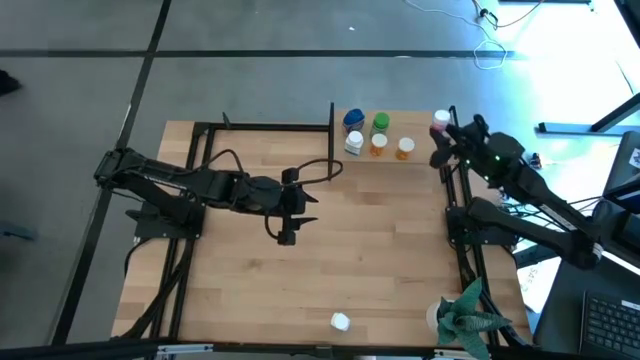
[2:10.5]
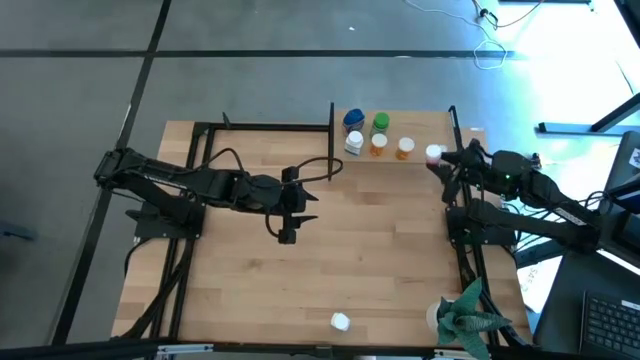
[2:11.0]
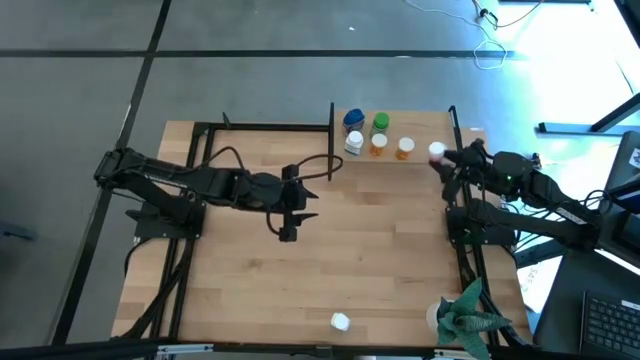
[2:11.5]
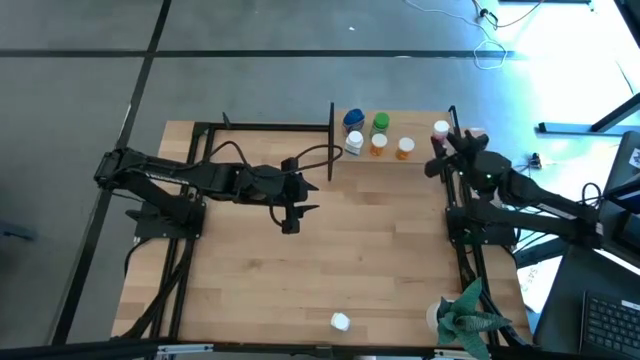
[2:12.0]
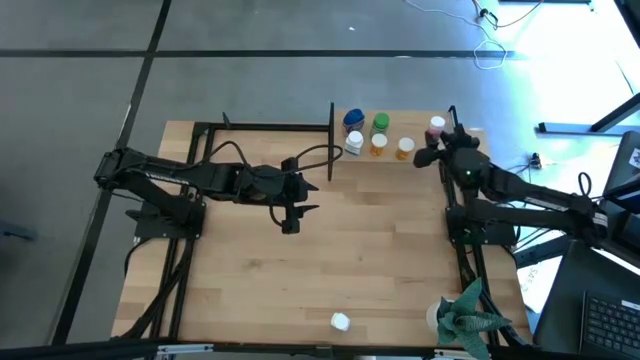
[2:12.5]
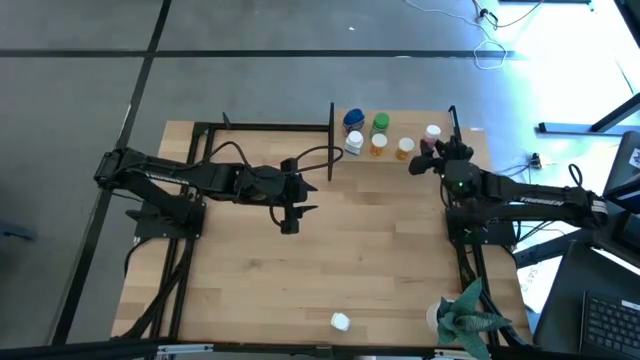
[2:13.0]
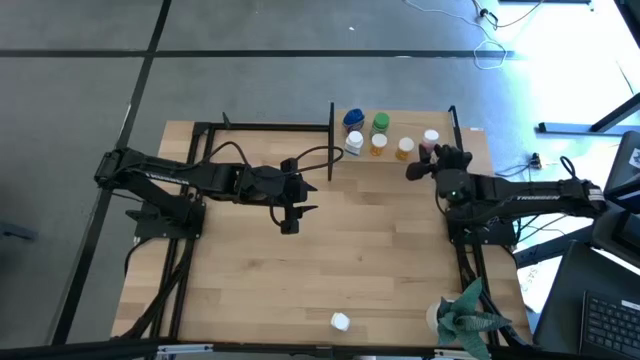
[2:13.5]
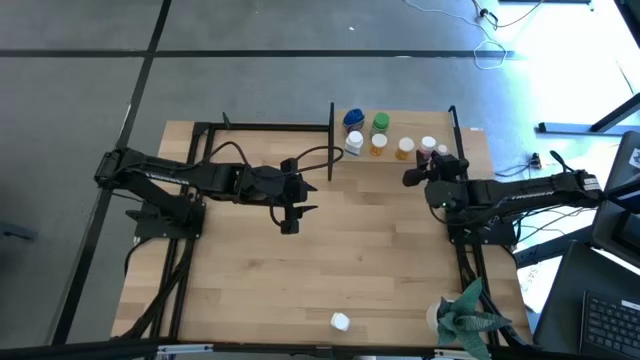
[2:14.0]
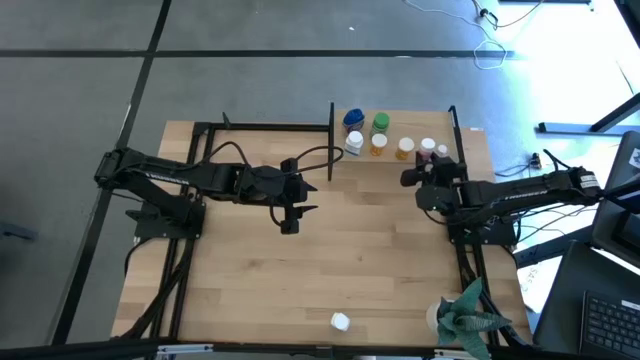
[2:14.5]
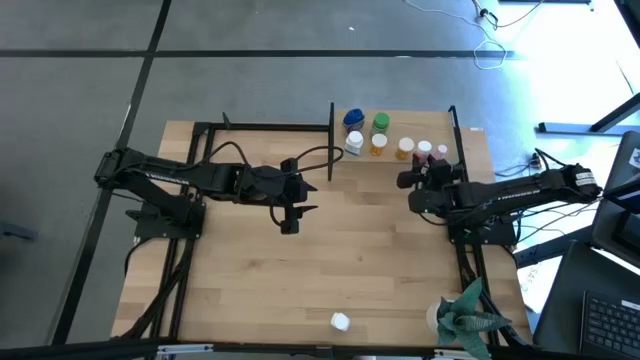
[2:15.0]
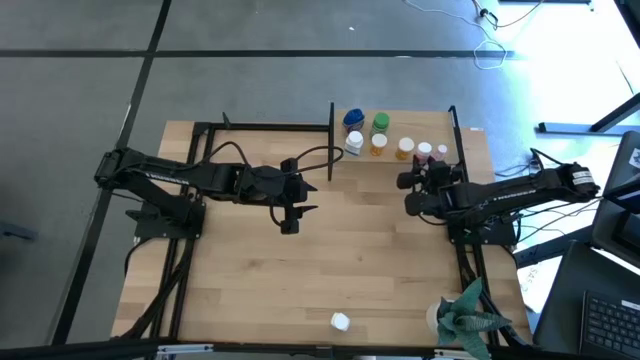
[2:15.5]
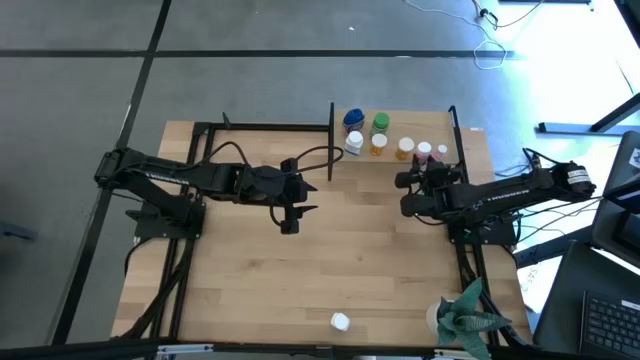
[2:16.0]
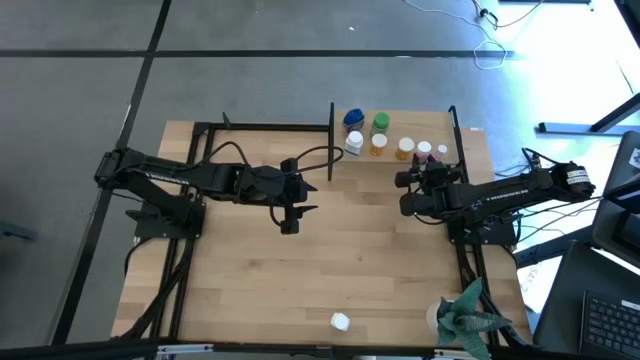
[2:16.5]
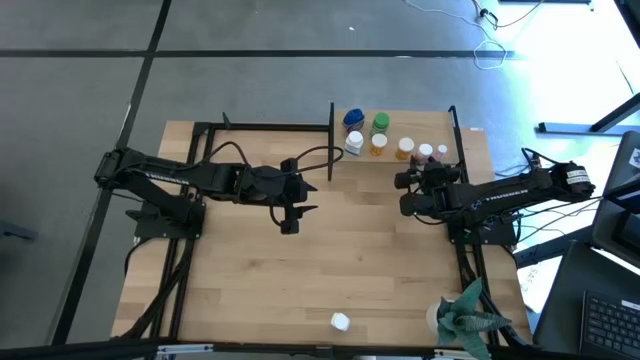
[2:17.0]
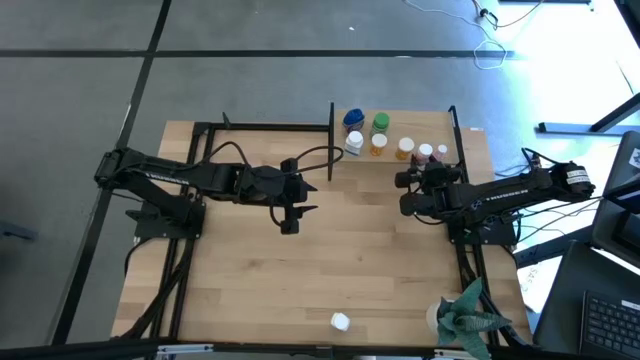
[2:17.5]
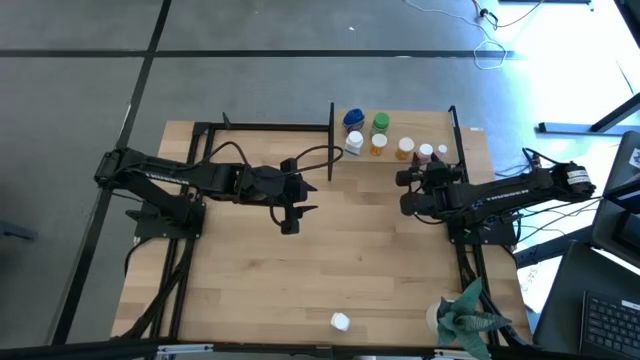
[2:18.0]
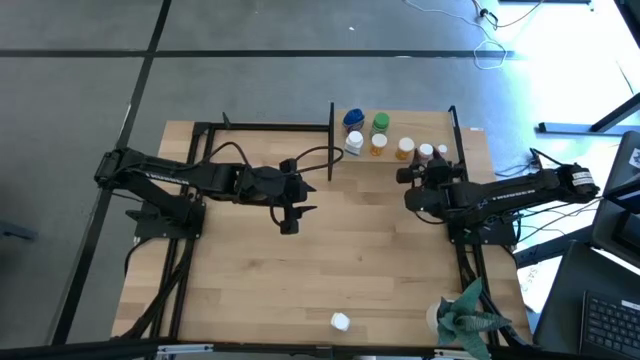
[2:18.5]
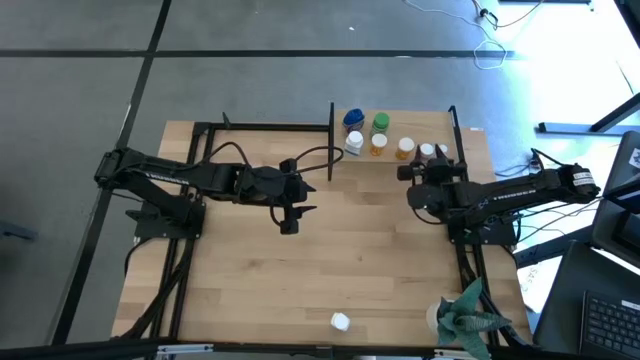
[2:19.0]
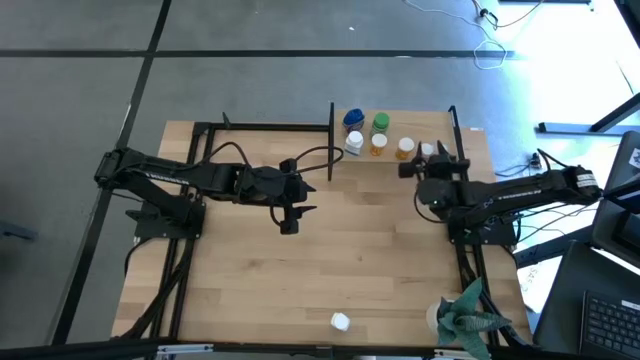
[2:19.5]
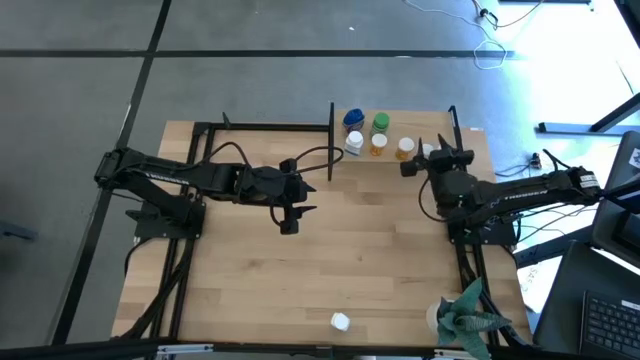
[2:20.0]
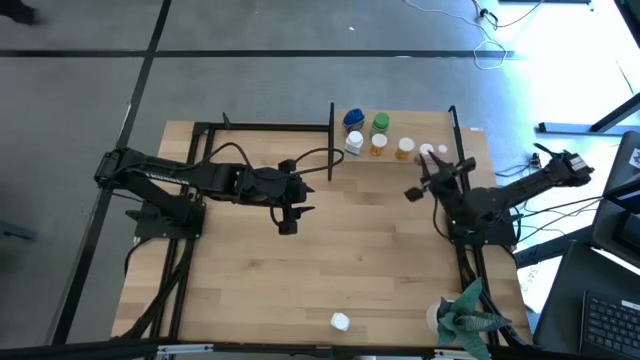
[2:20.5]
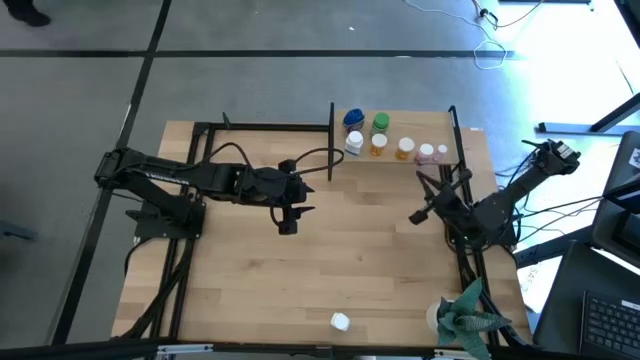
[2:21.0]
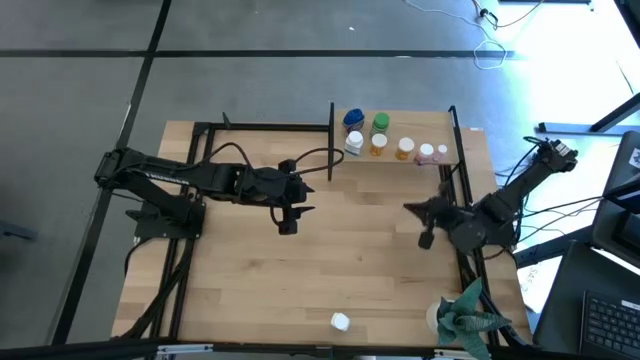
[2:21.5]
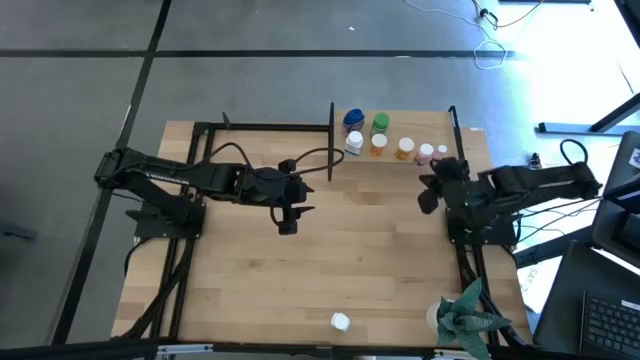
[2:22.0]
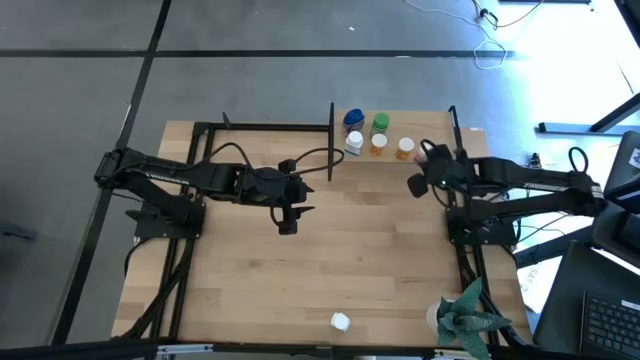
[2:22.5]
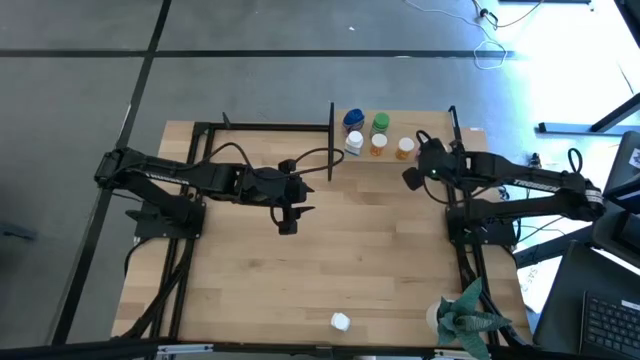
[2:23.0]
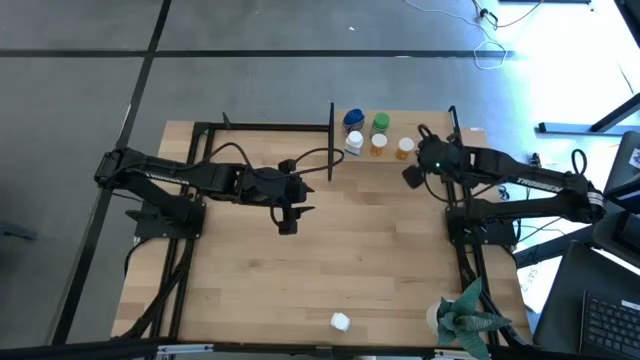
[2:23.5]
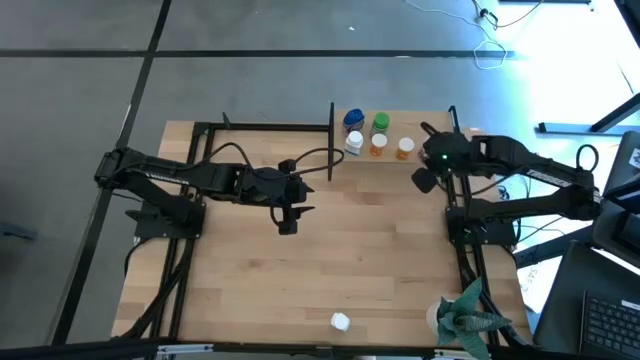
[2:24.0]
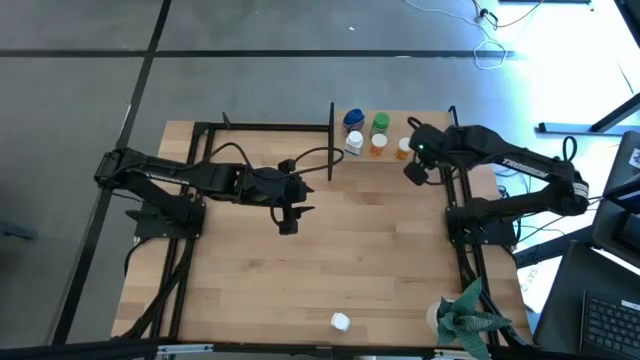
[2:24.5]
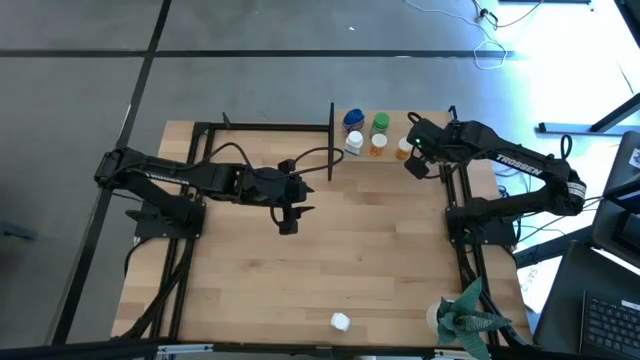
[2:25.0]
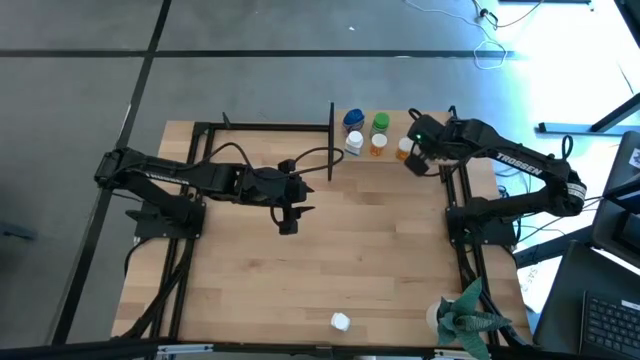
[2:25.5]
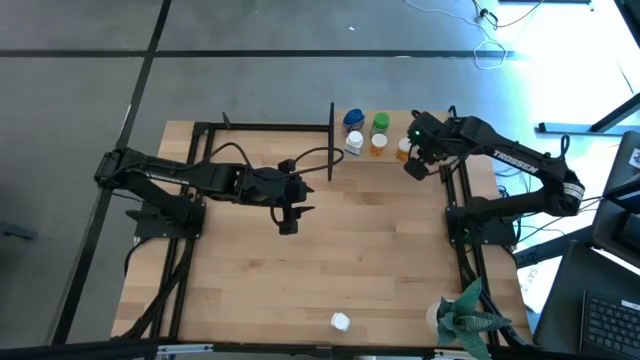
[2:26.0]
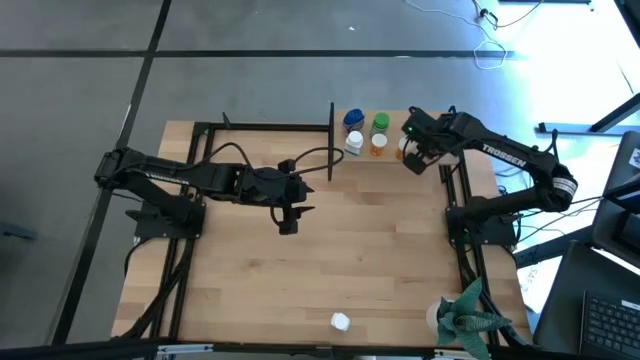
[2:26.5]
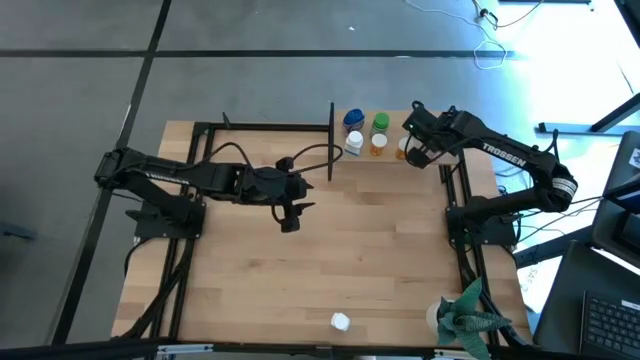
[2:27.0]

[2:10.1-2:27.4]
Task: Pick and place medicine bottles onto shelf by color
Put the pink medicine bottle on the shelf

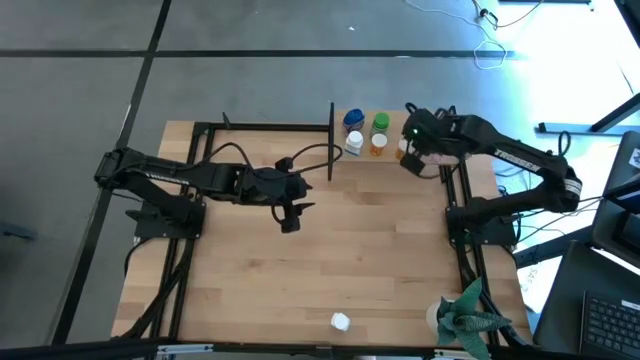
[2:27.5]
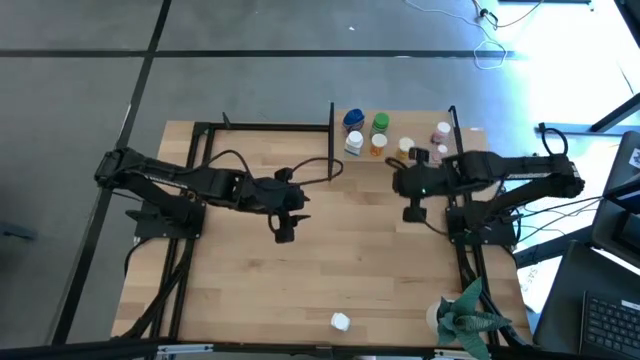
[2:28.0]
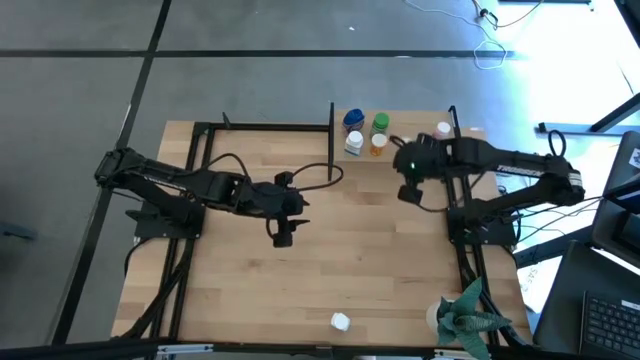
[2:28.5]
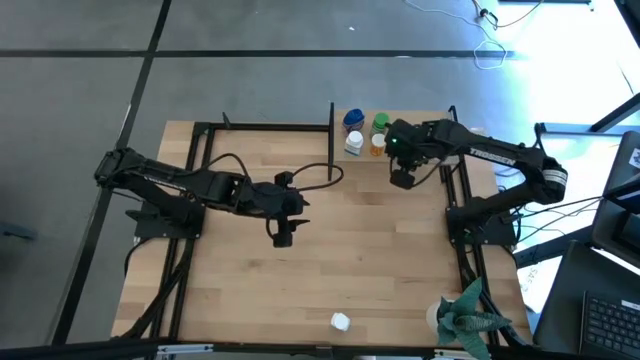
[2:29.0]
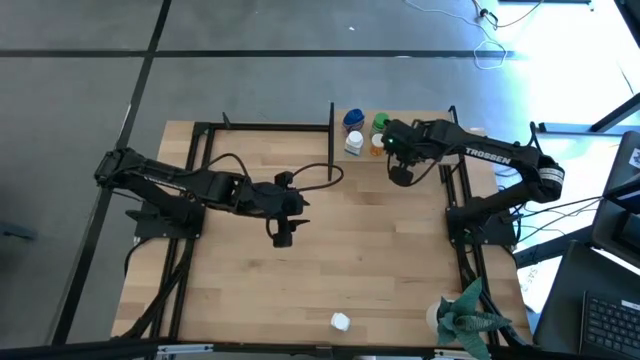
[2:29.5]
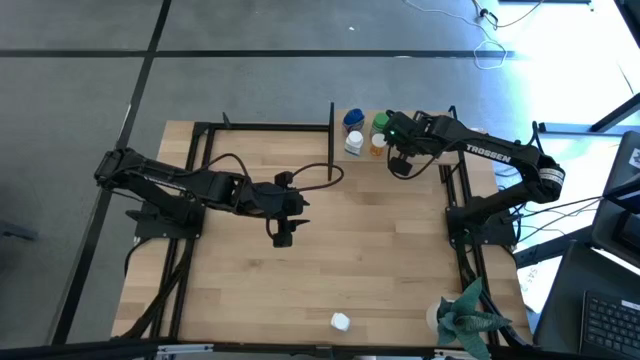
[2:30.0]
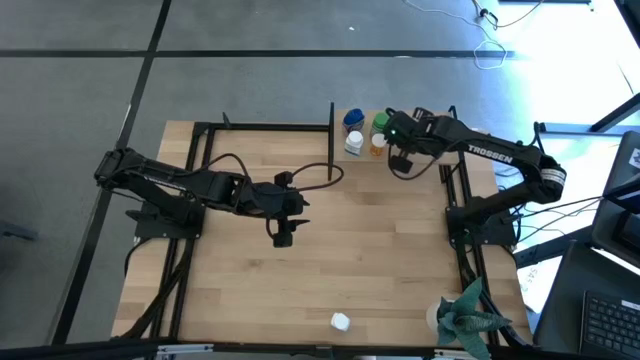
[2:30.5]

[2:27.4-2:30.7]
Adjust the orange medicine bottle on the shelf

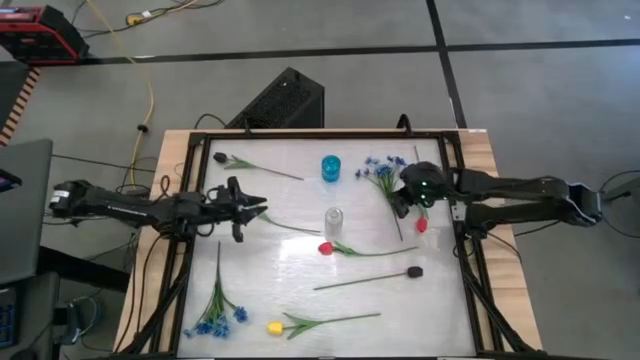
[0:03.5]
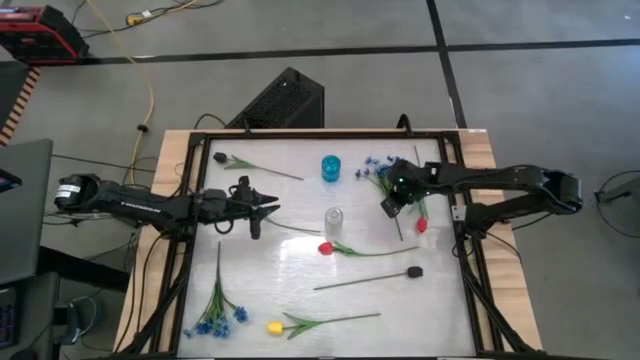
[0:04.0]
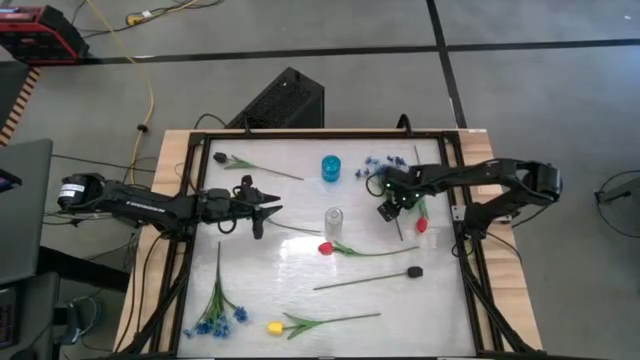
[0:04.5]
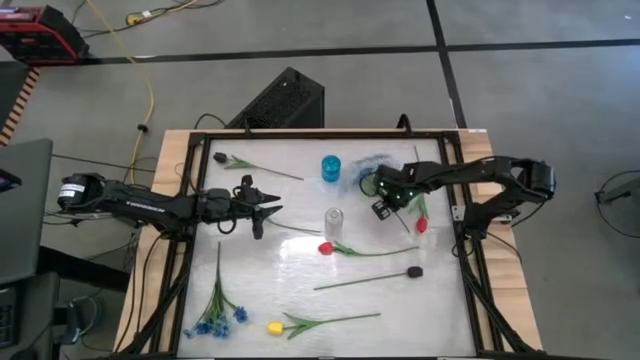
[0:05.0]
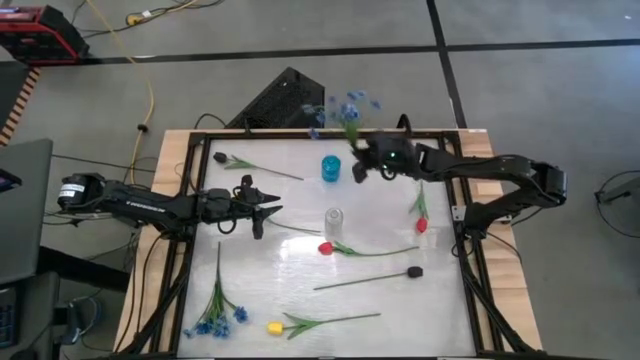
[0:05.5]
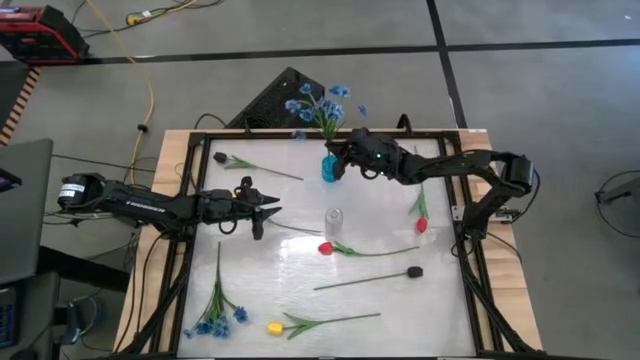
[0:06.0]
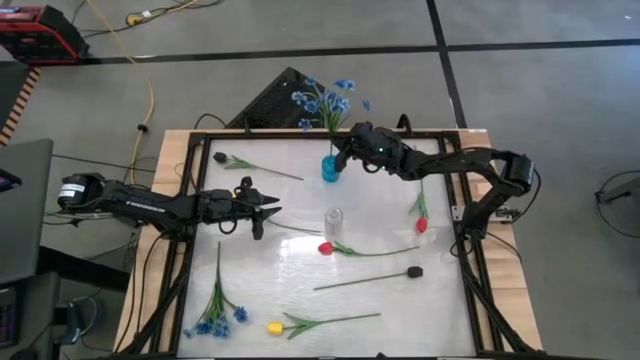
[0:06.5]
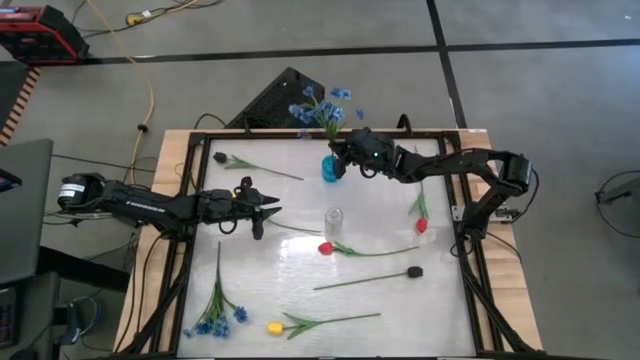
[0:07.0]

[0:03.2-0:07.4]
Task: Sort flowers into vase by color
Put the right blue flowers into the blue vase
